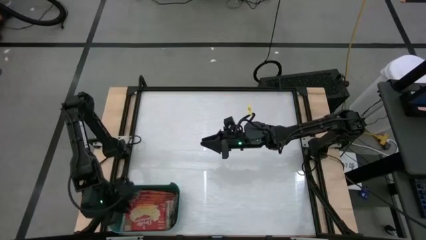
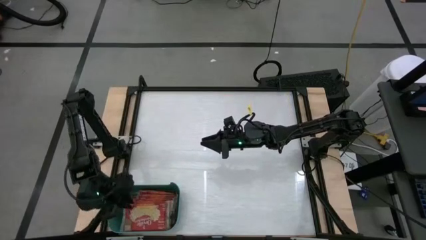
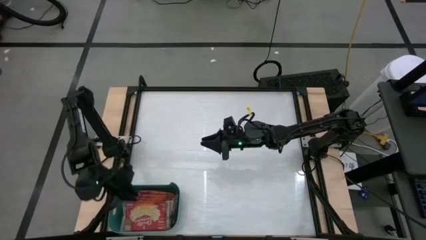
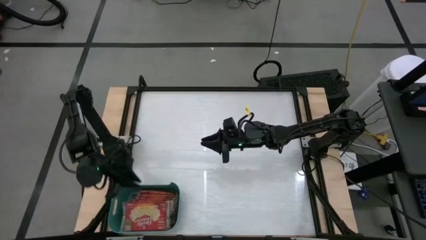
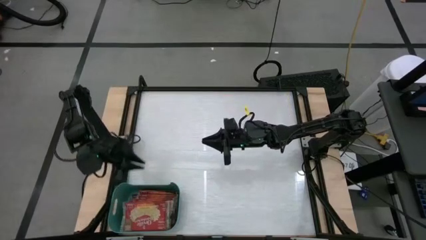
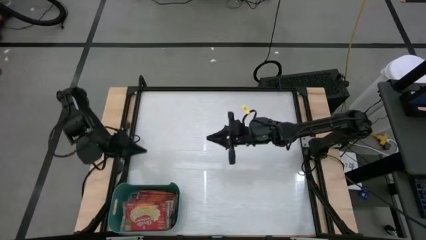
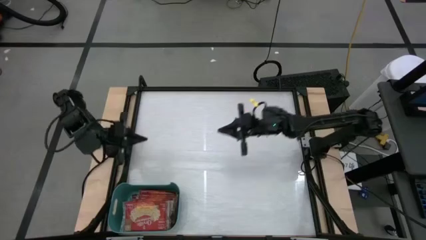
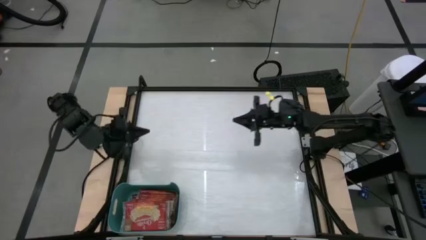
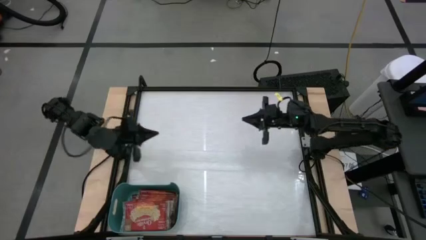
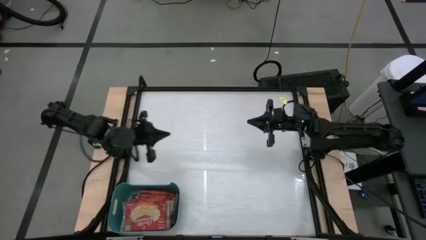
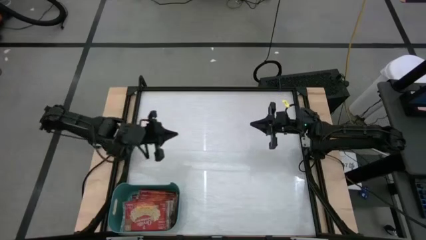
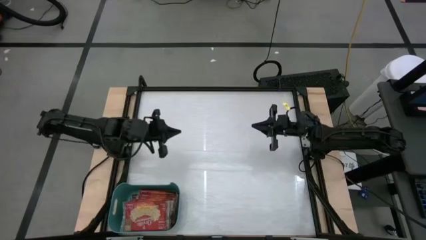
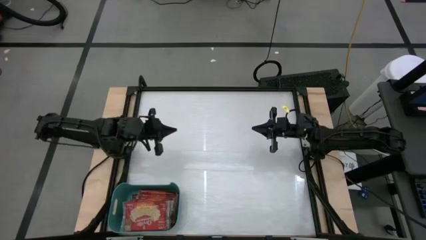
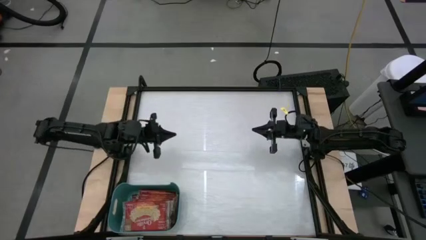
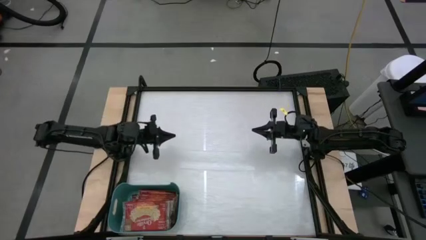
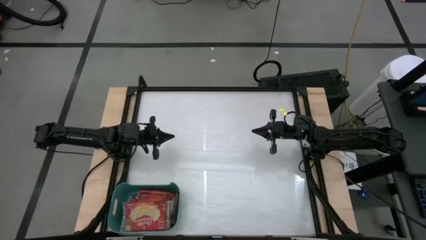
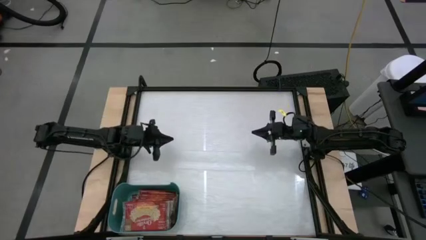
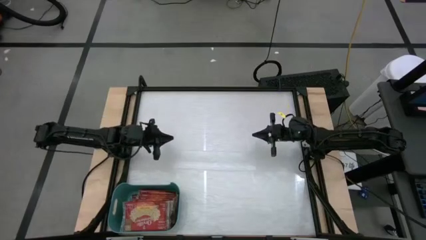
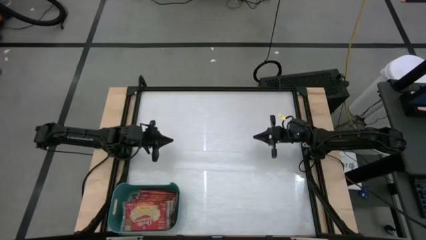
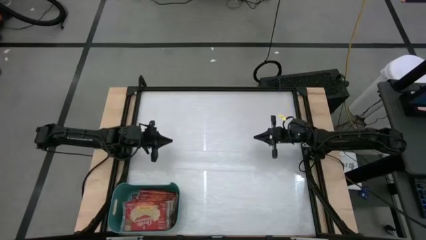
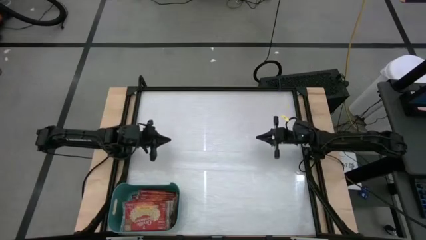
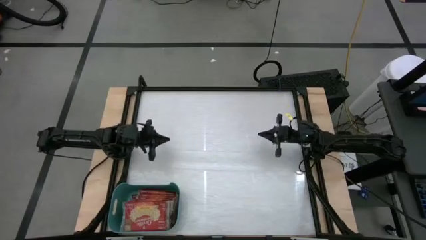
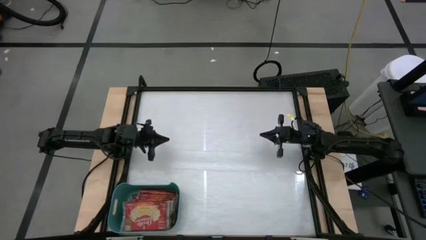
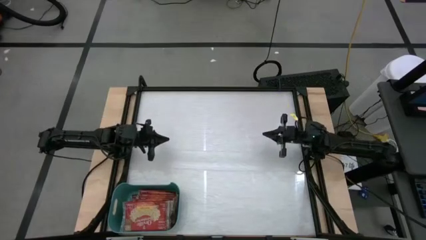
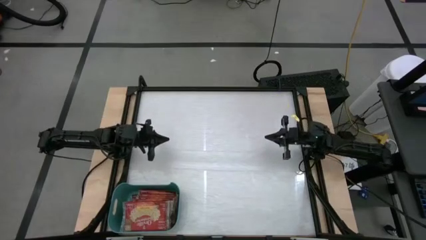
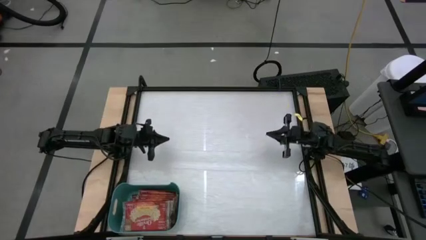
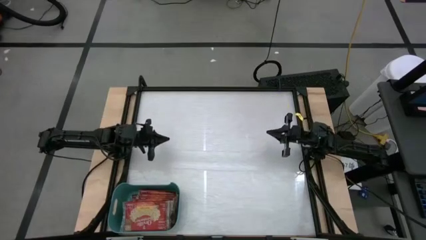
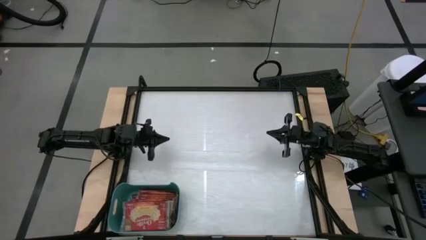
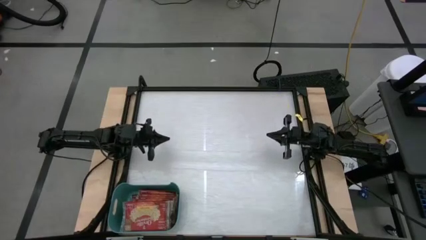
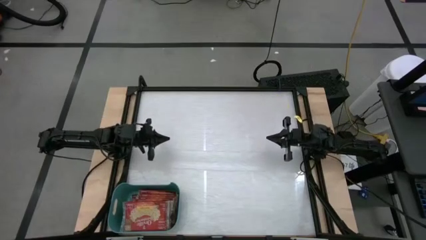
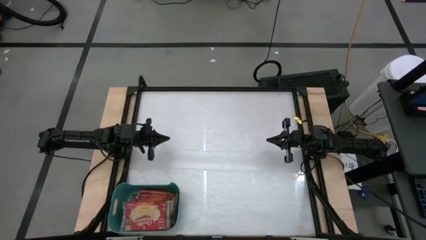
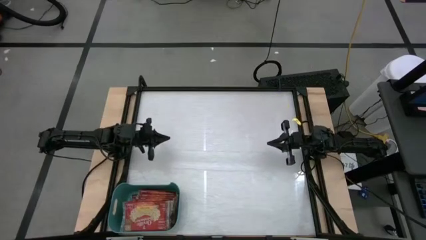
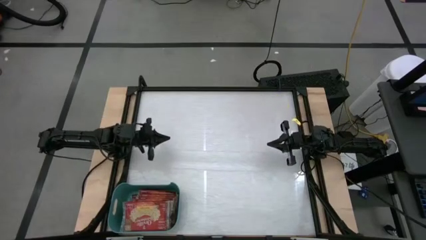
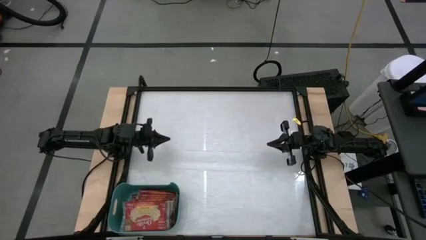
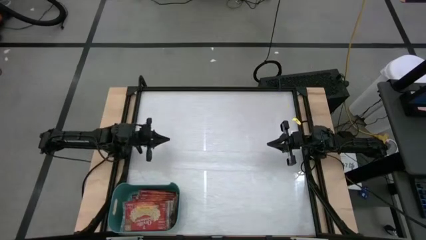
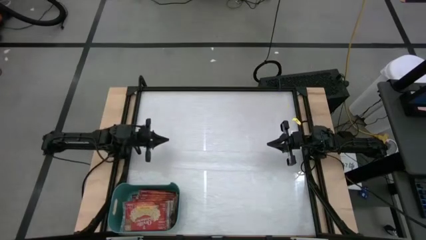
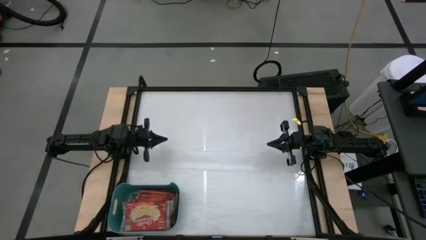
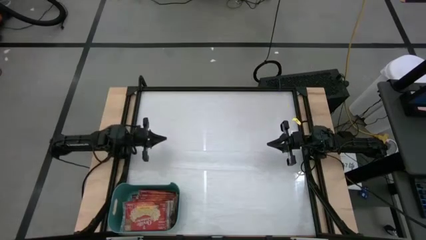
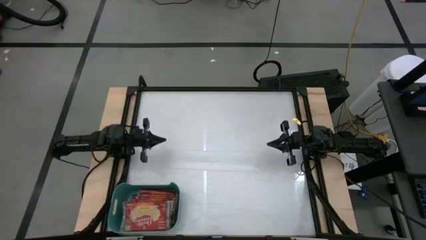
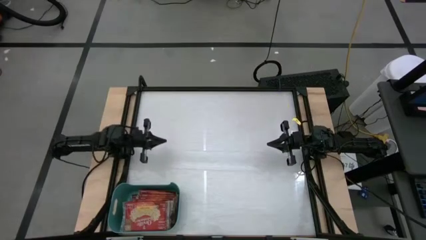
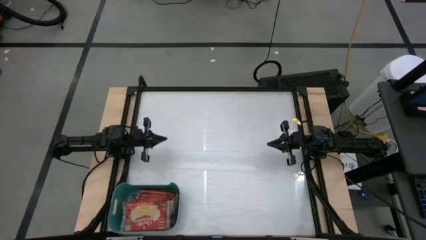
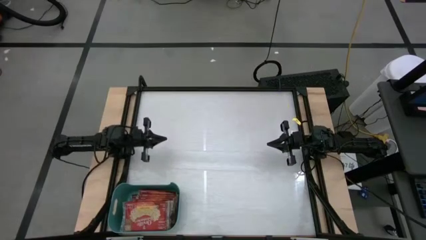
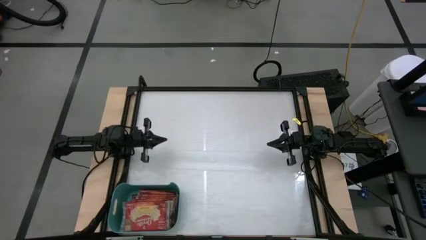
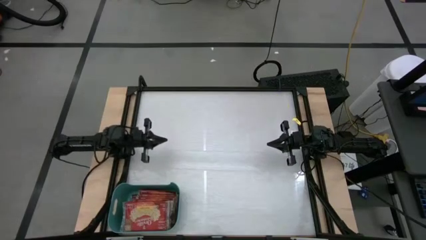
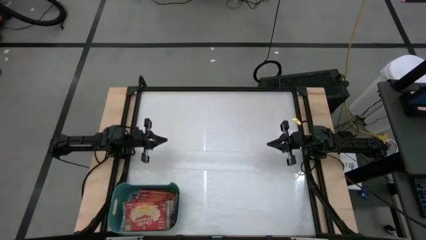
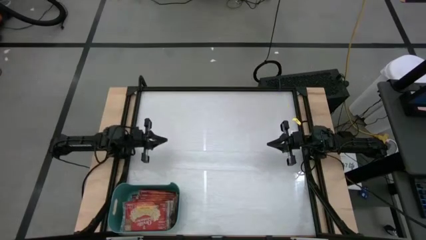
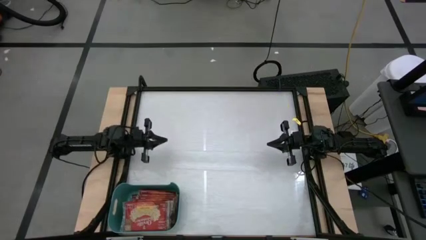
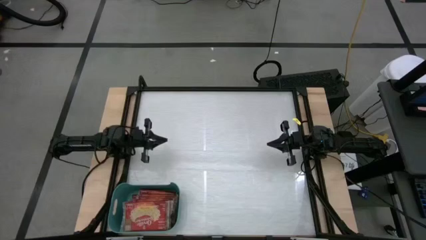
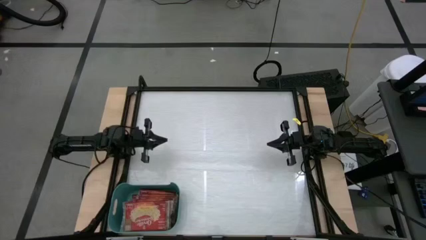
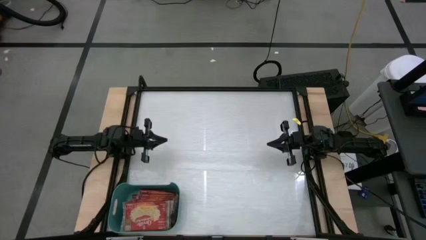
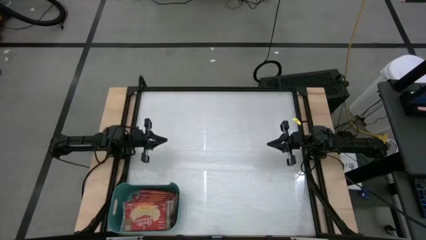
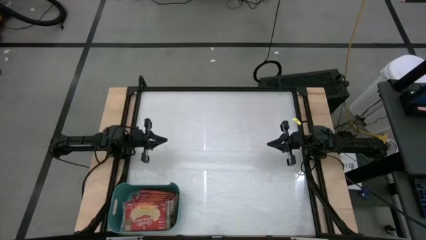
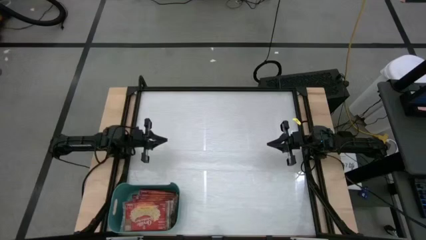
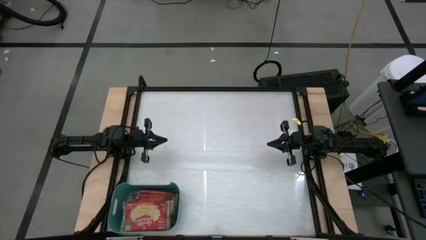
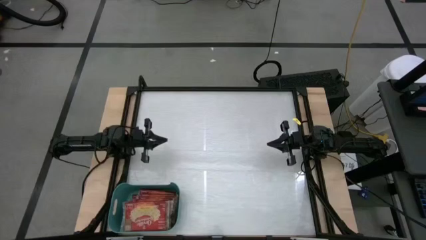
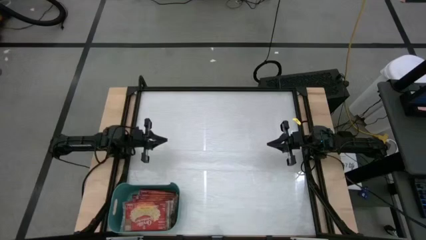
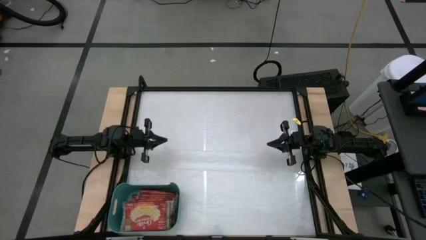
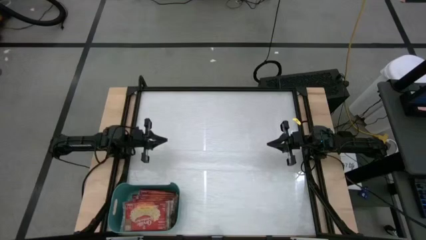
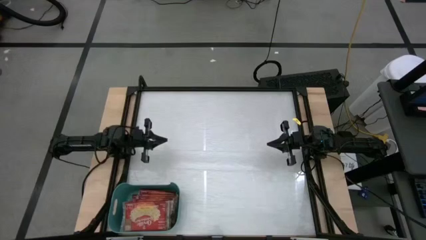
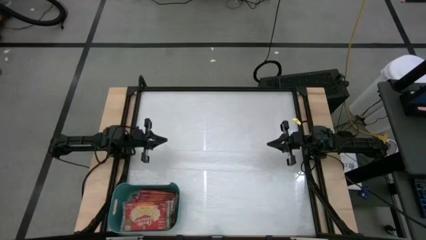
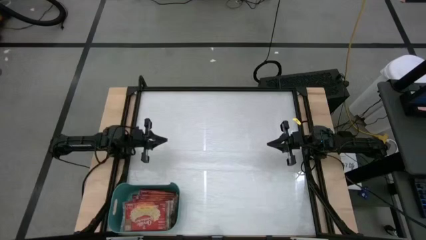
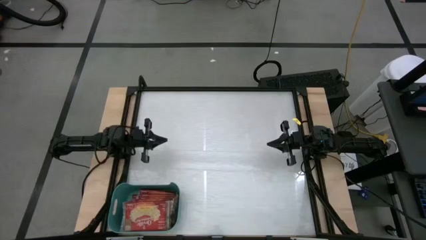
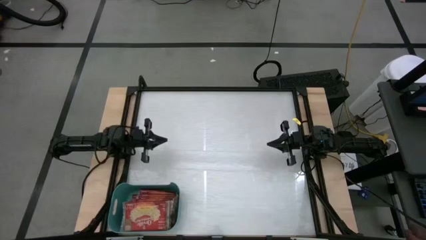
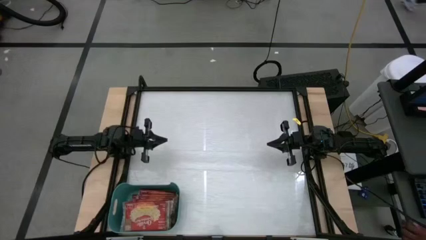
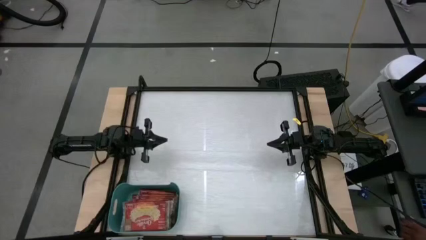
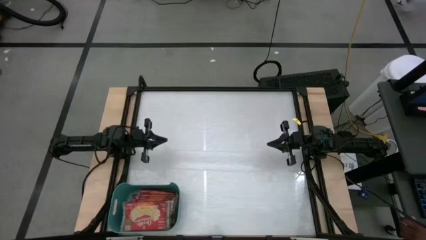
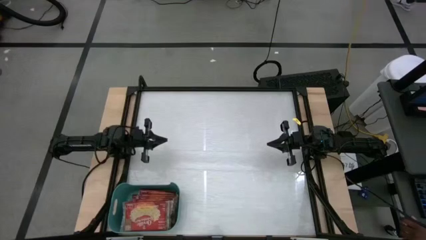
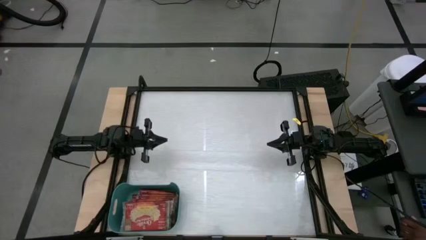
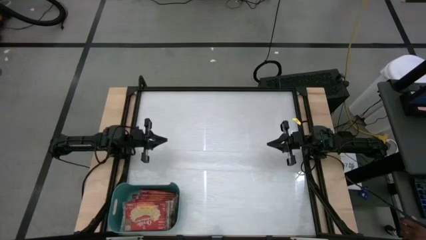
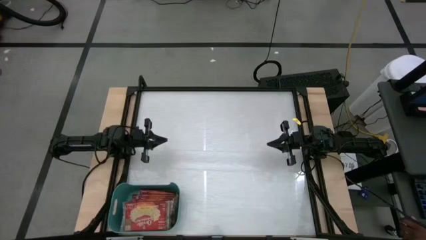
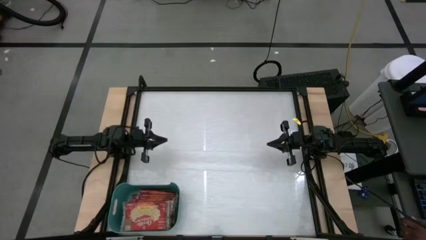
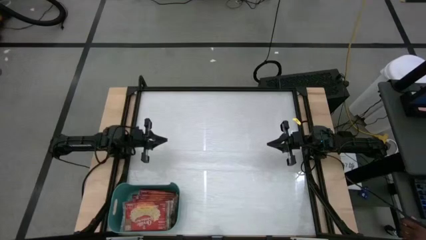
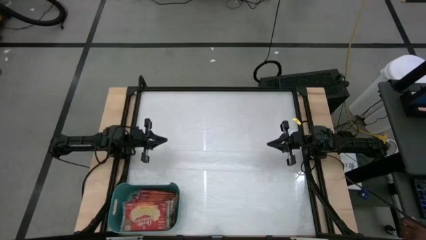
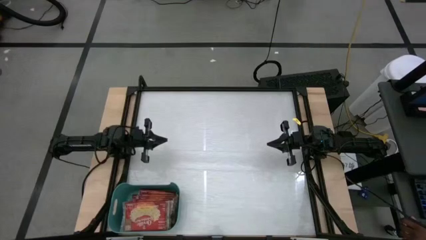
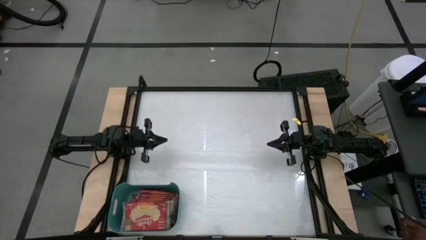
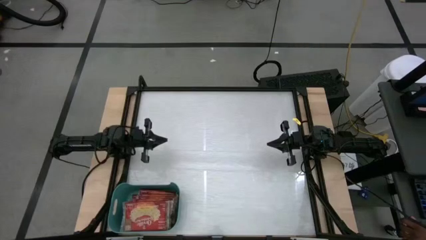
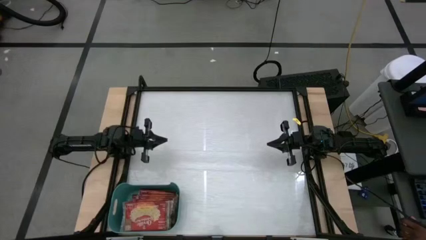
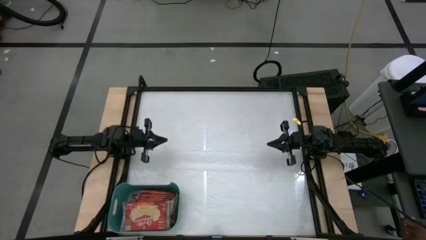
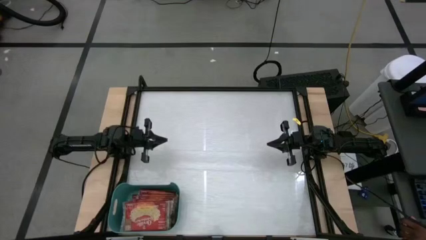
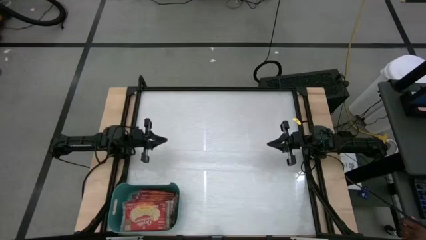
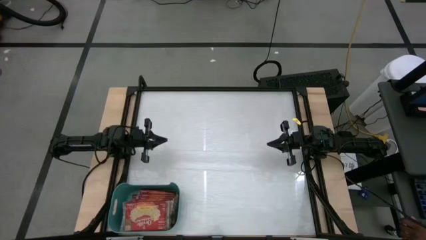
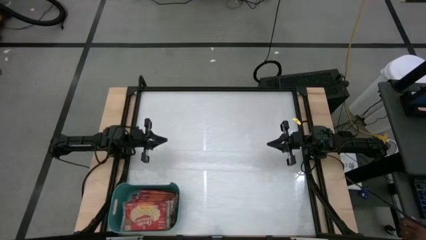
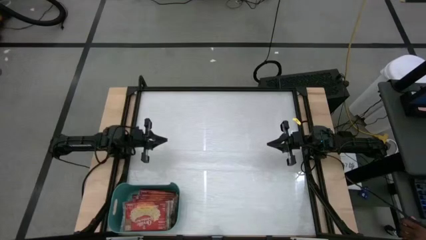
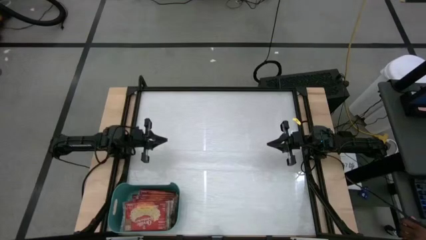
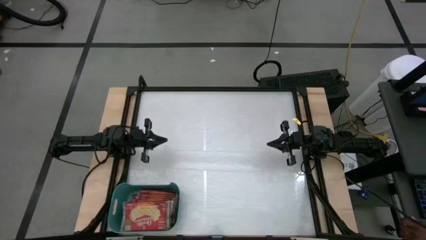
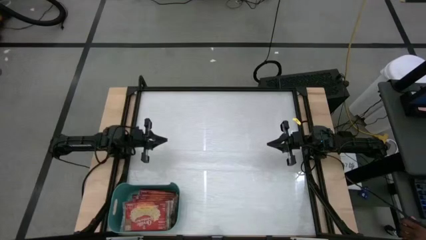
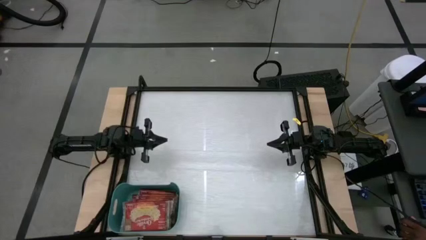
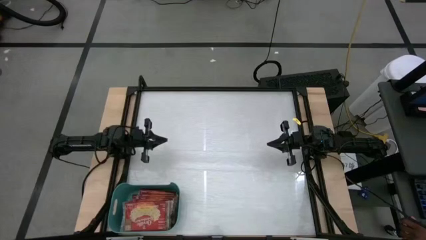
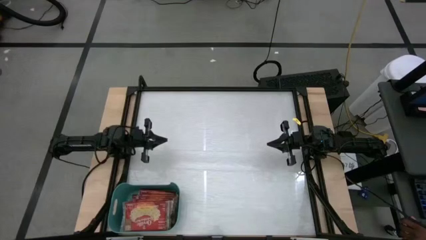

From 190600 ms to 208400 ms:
Task: Sort popcorn bags into baskets
Return to Home Position
